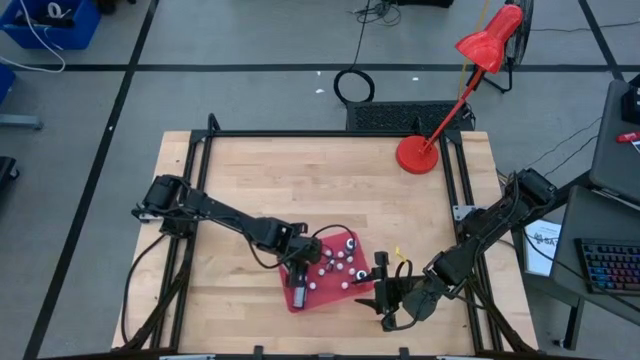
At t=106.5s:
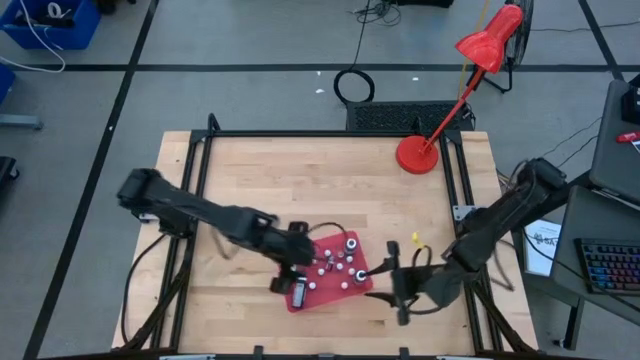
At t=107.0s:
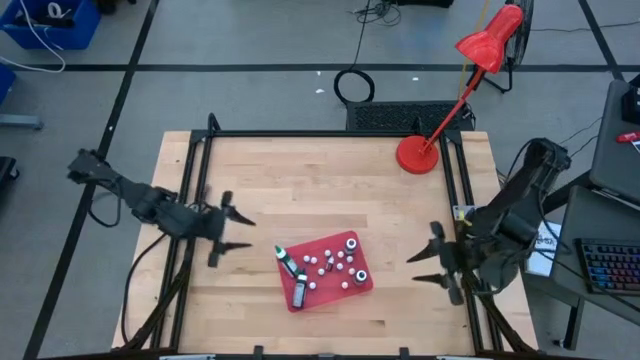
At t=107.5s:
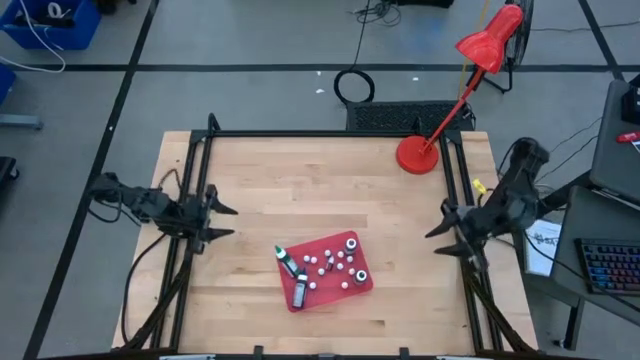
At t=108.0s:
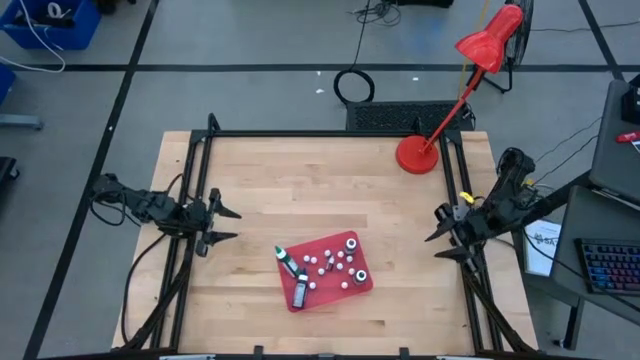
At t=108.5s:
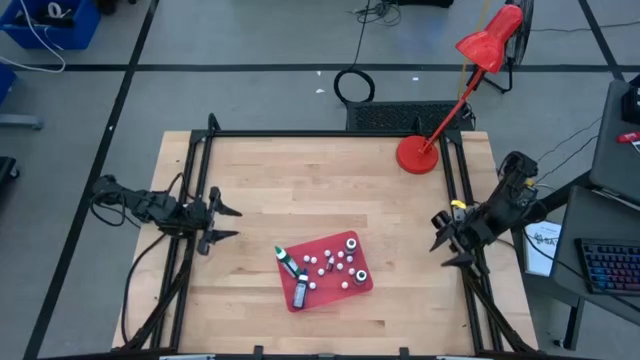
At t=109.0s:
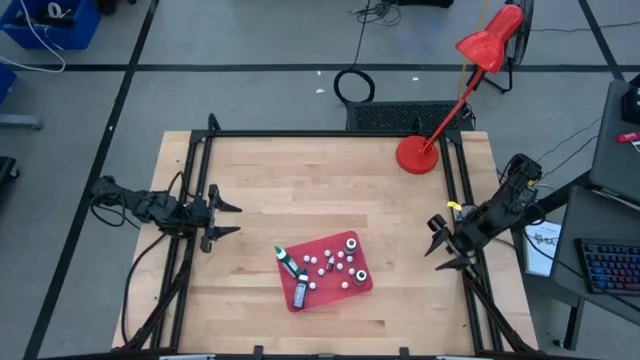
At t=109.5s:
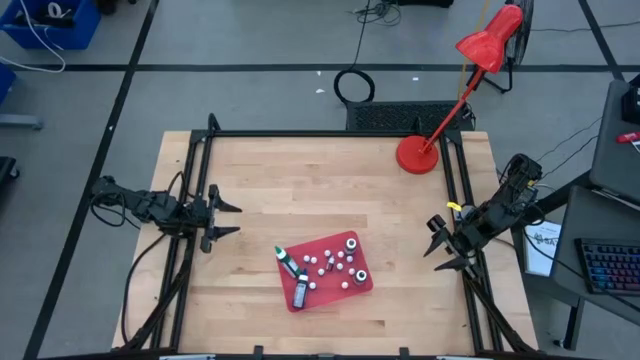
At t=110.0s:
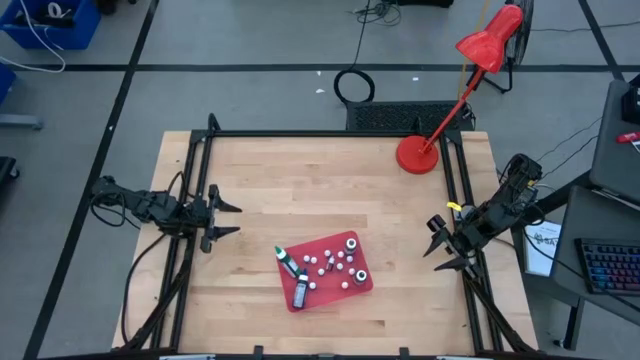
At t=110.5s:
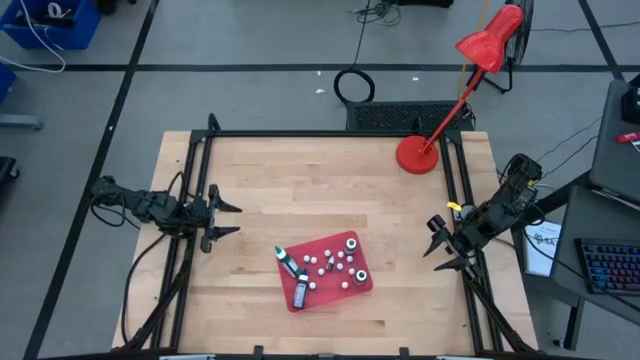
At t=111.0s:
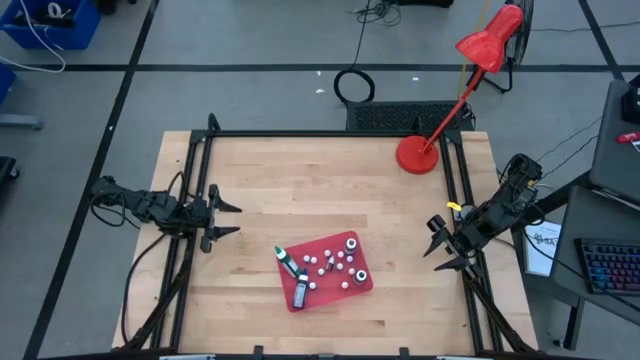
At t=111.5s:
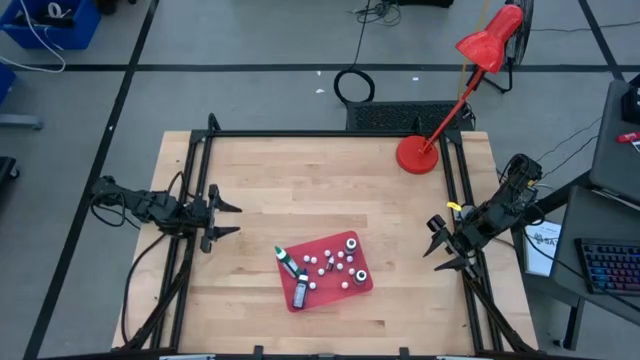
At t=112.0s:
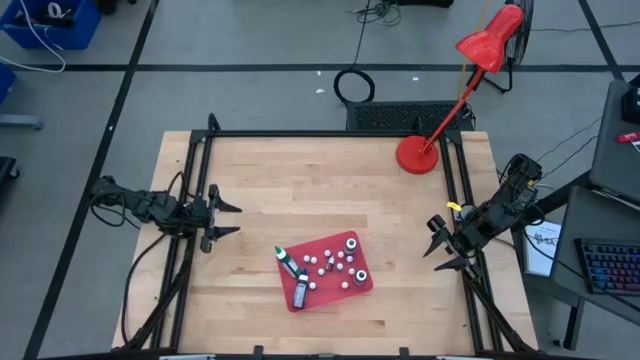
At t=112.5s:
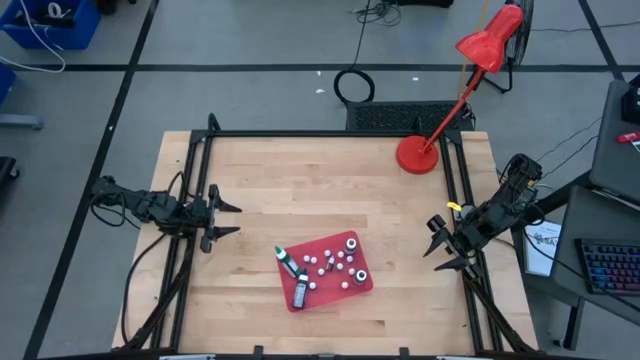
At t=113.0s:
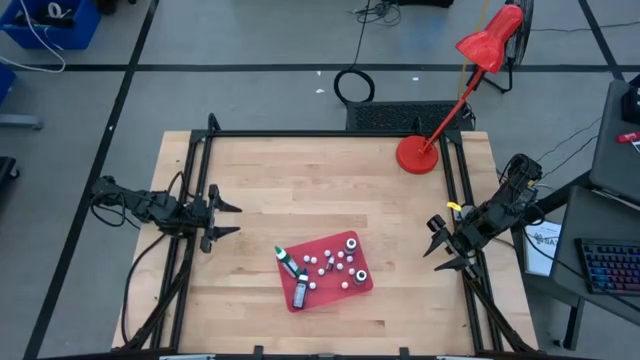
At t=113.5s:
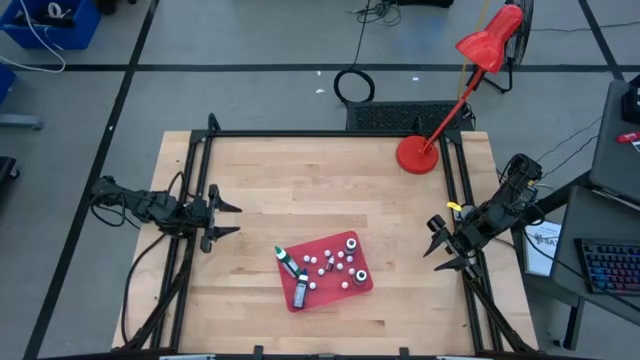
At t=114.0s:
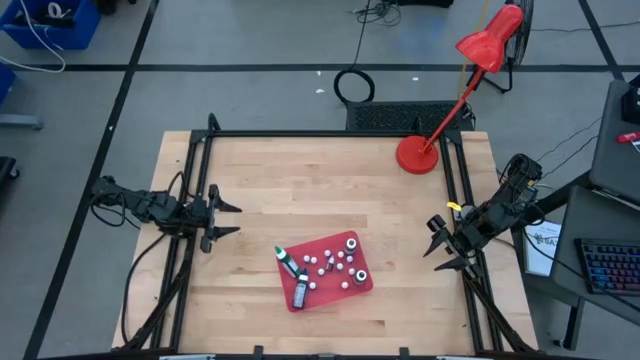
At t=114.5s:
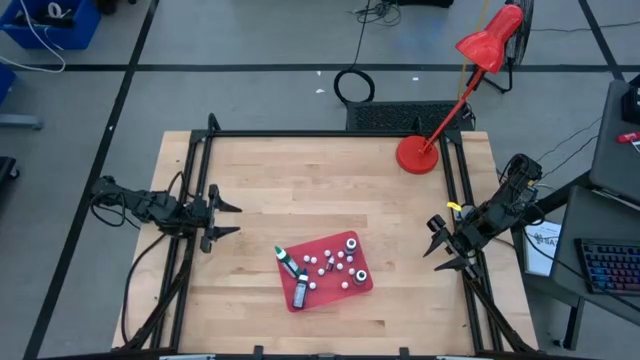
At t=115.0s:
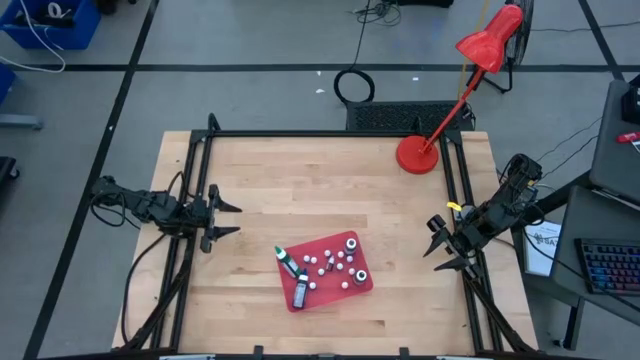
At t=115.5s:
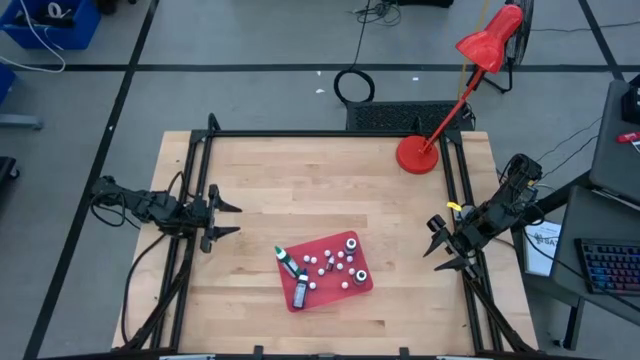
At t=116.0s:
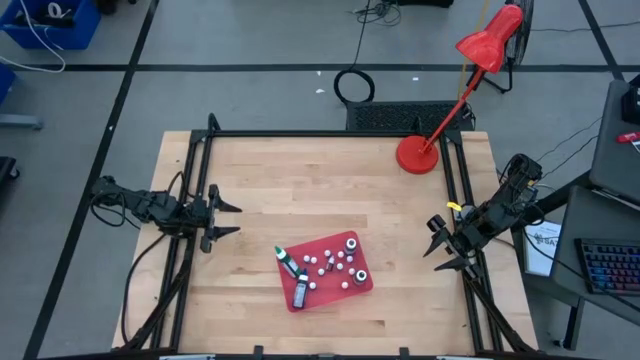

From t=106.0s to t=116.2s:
Task: Pick & Place food coloring
Return to Home Position

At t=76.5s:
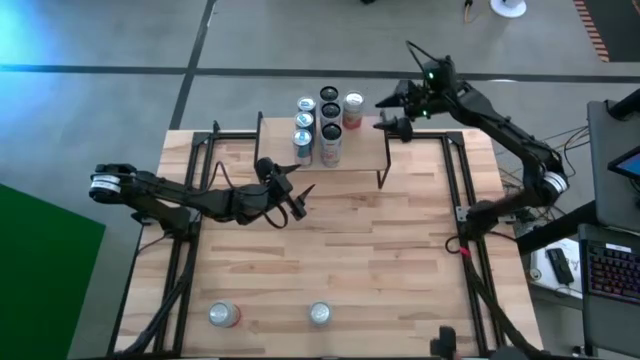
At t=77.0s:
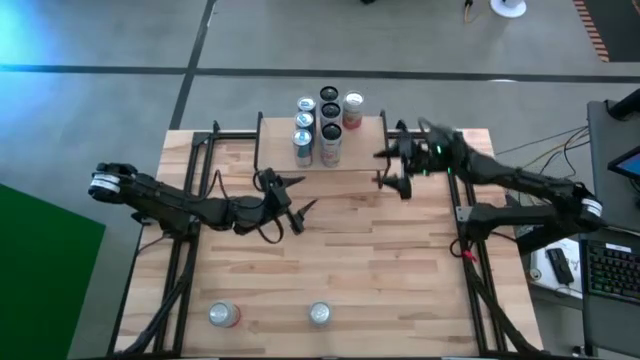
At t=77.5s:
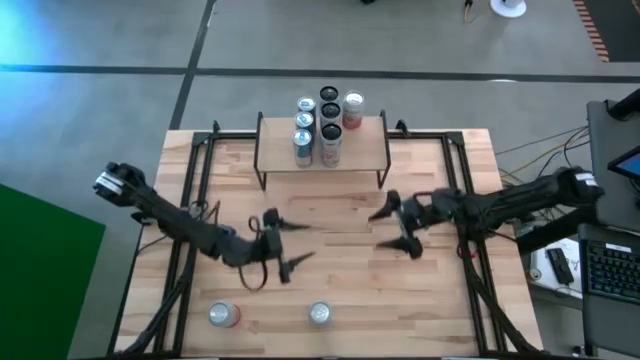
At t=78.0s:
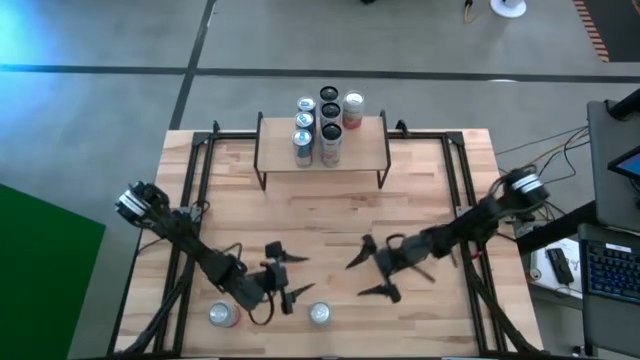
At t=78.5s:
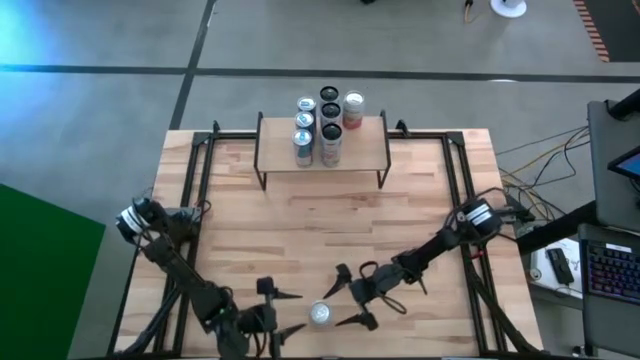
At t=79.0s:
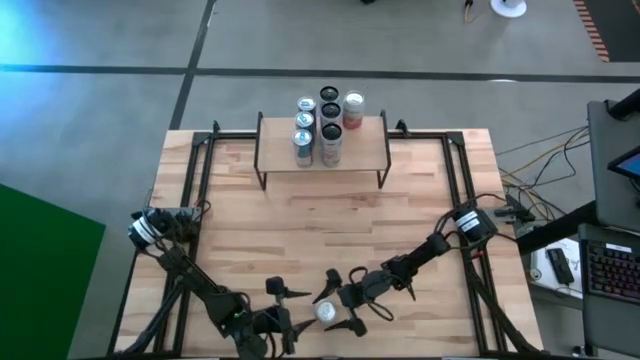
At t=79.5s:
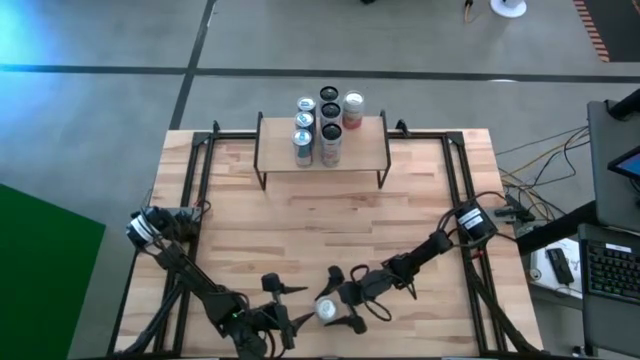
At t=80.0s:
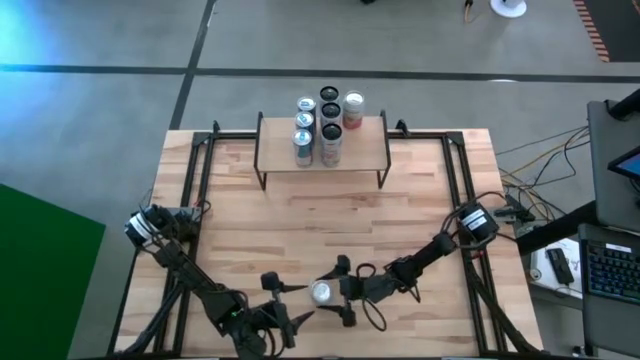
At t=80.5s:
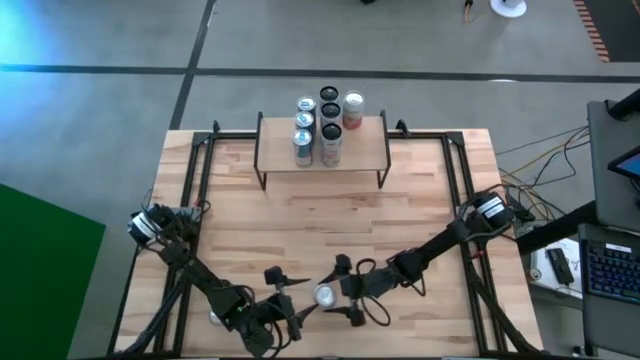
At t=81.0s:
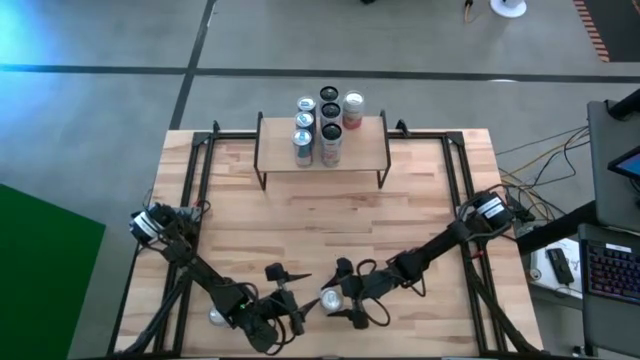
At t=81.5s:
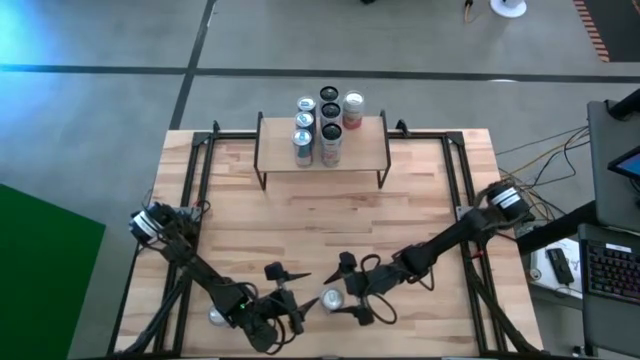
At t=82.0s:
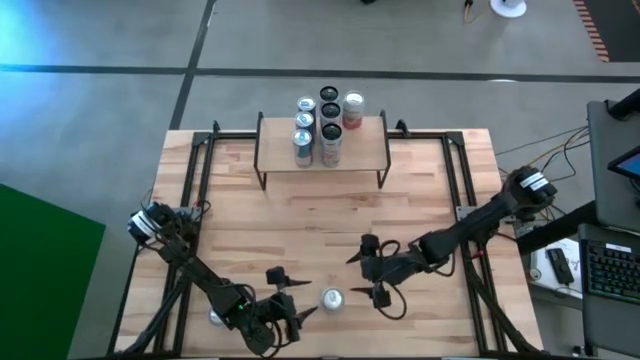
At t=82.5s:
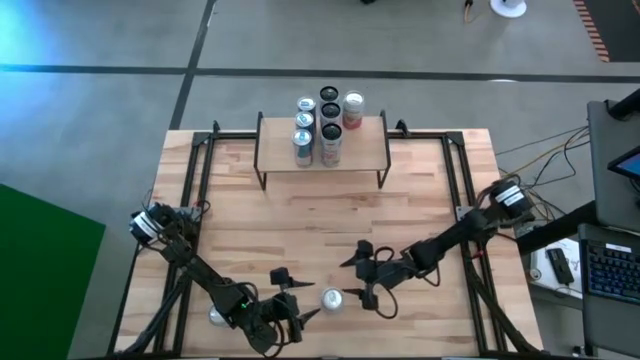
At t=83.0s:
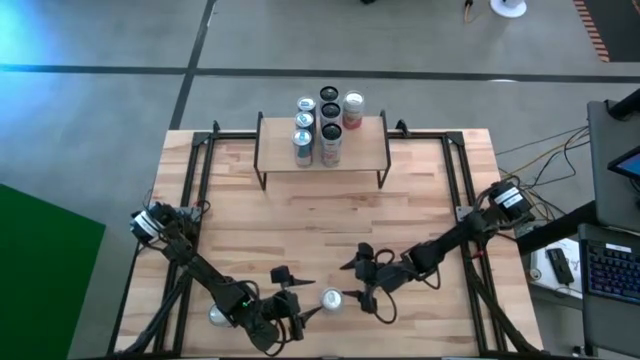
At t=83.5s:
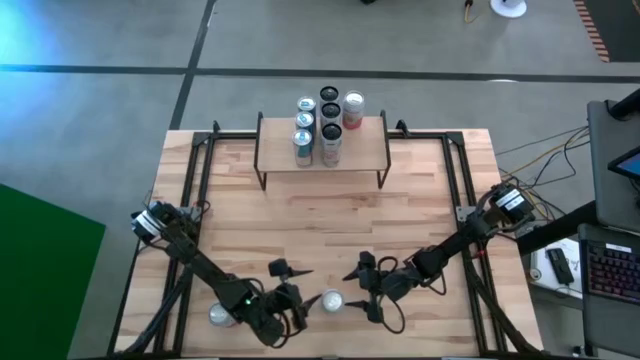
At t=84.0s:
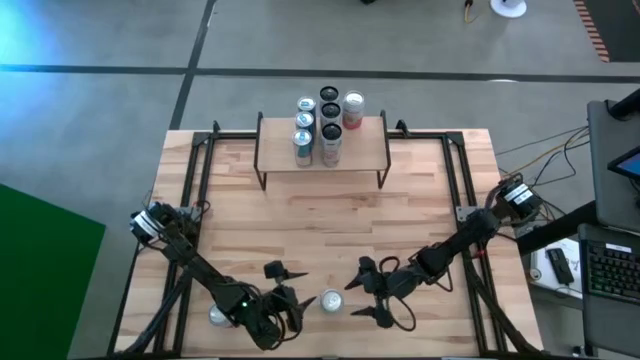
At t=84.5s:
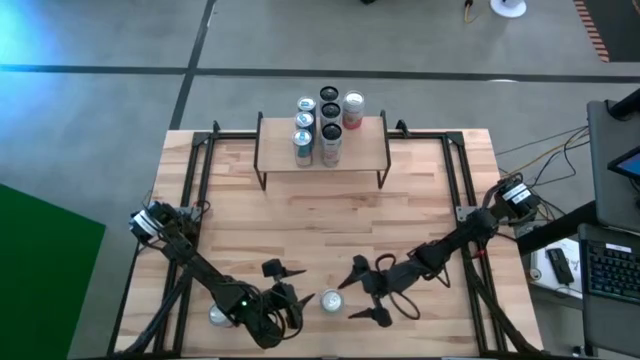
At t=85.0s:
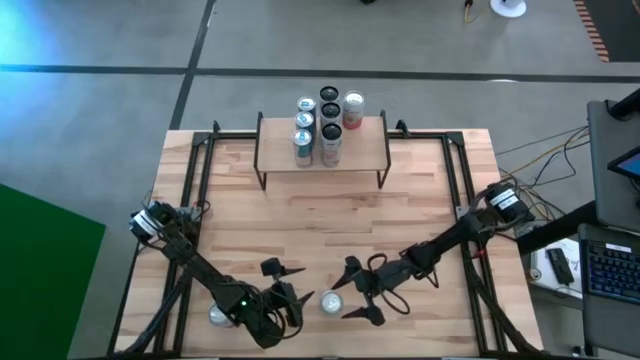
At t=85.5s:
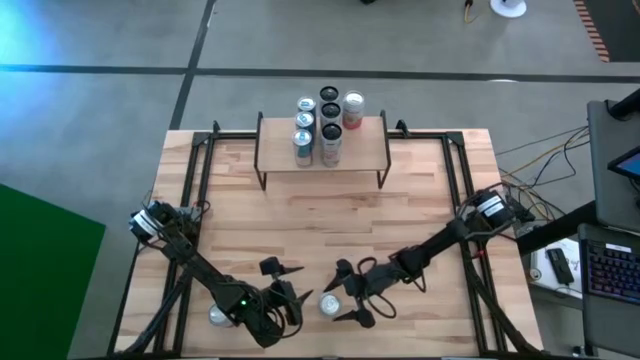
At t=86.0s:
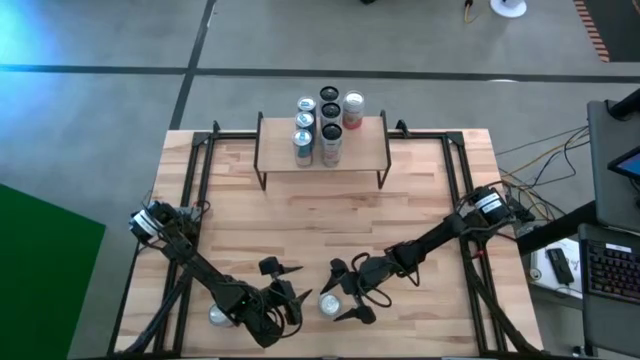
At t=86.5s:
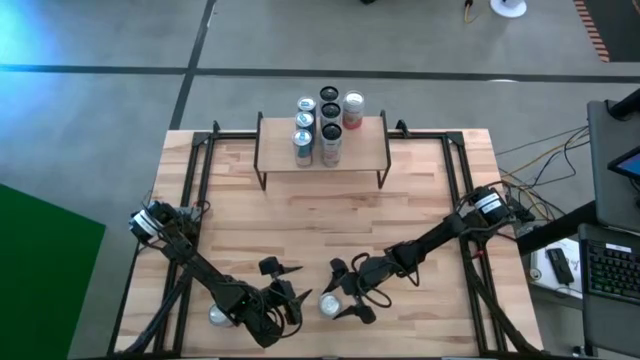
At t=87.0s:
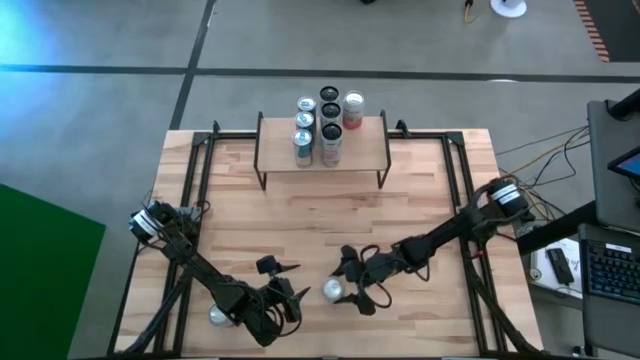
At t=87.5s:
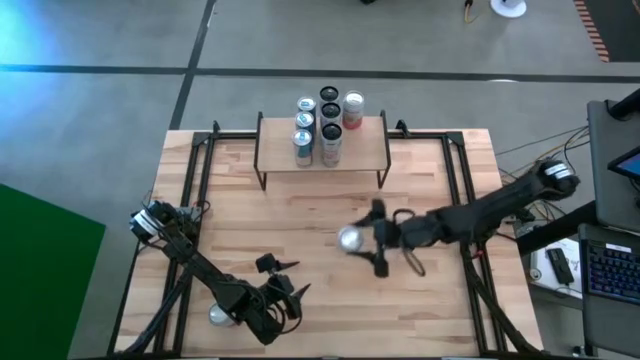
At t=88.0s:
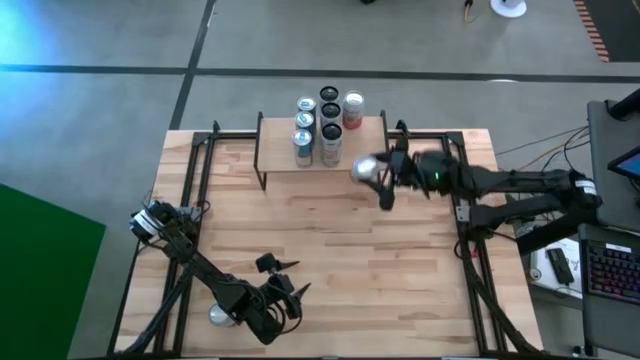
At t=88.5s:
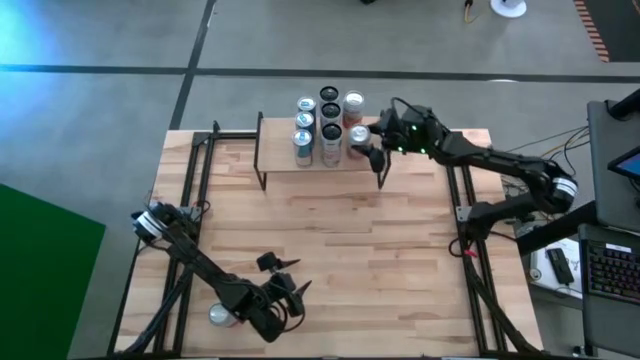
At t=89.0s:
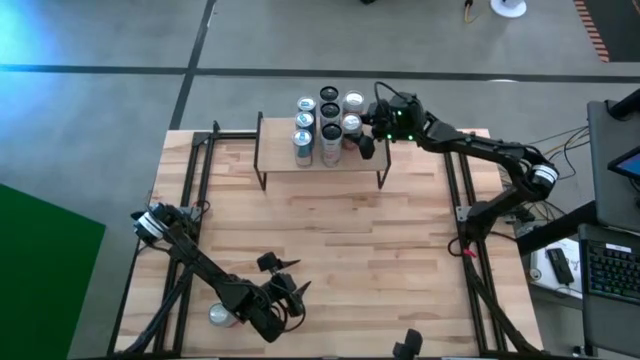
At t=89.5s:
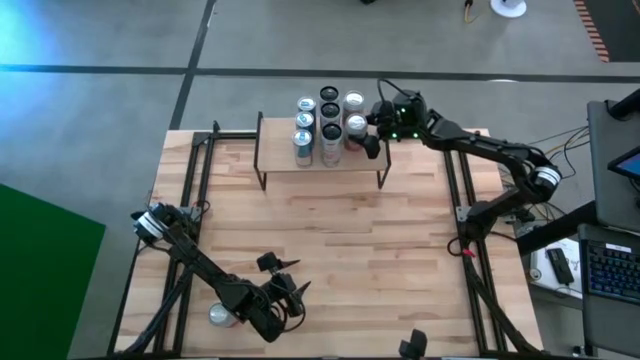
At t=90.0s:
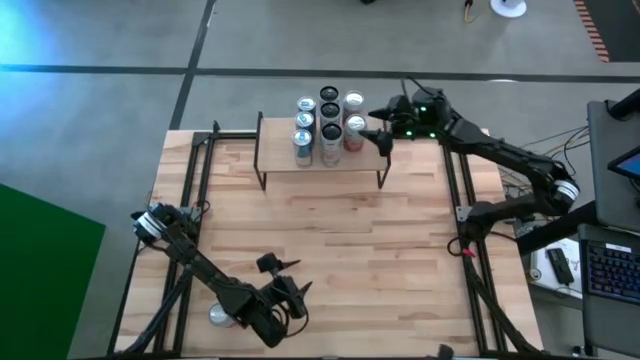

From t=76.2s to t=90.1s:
Task: Place canned beverage on shelf
Align the right pink-white soda can with the other pink-white soda can on the shelf
